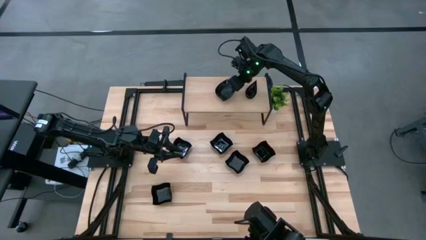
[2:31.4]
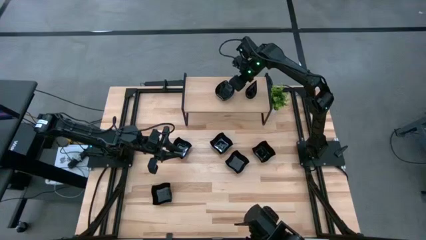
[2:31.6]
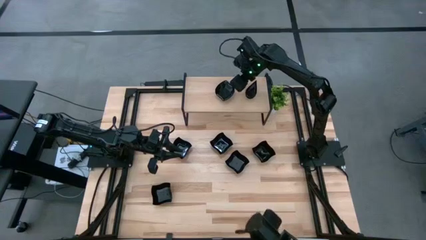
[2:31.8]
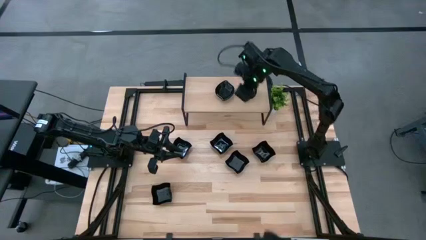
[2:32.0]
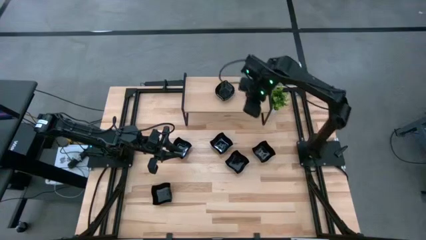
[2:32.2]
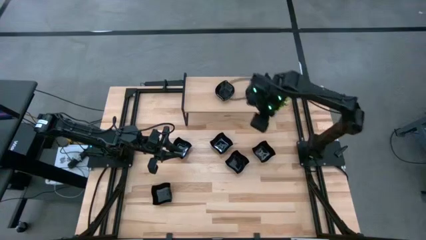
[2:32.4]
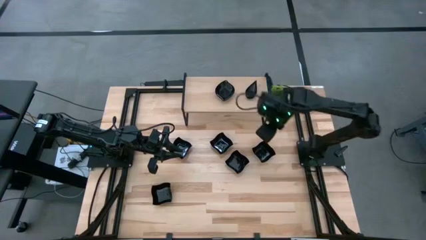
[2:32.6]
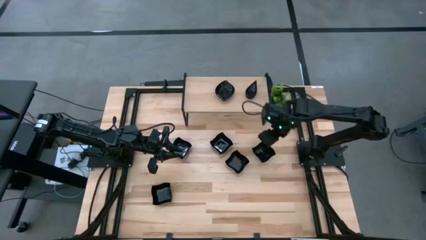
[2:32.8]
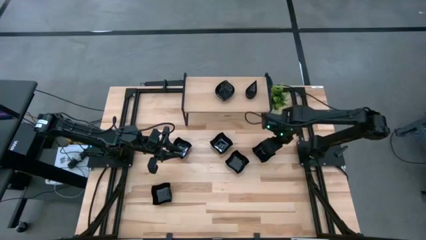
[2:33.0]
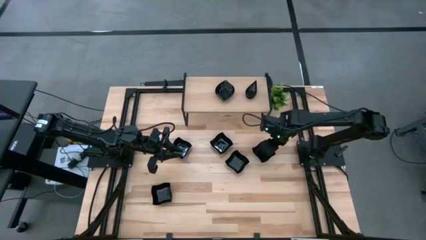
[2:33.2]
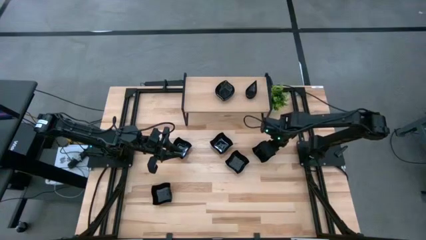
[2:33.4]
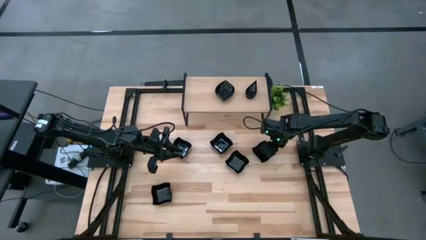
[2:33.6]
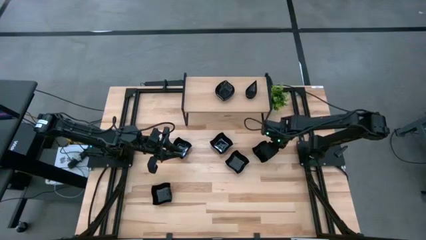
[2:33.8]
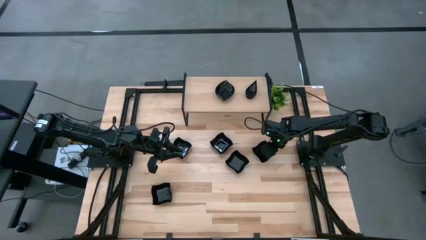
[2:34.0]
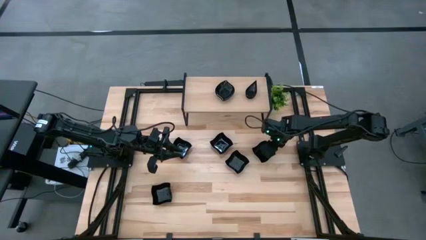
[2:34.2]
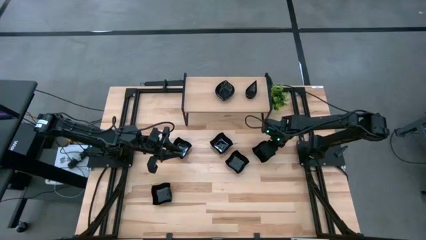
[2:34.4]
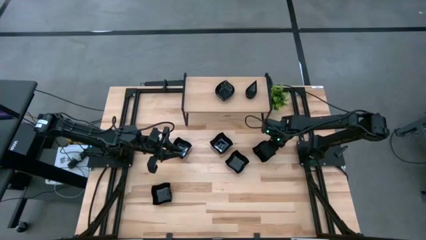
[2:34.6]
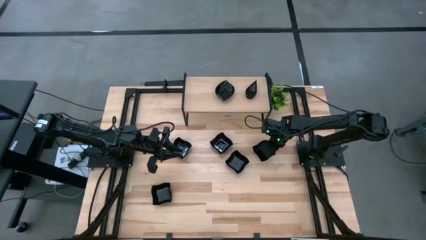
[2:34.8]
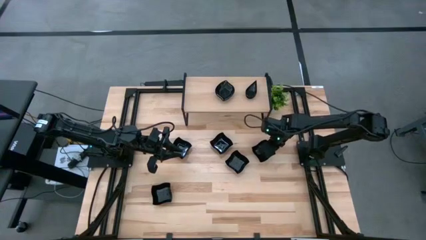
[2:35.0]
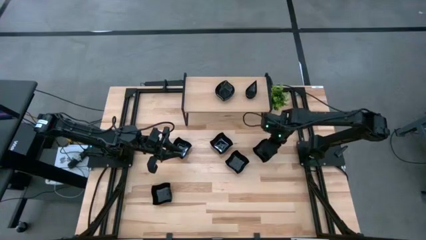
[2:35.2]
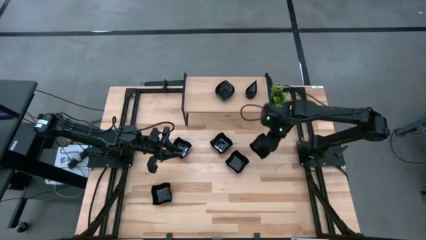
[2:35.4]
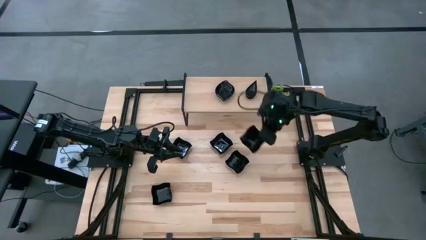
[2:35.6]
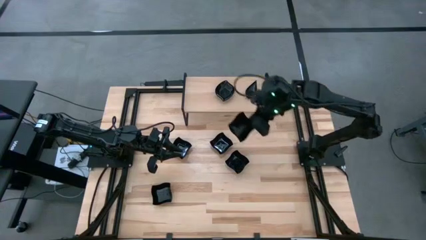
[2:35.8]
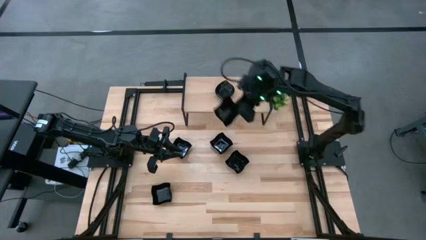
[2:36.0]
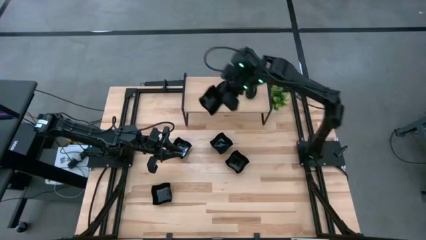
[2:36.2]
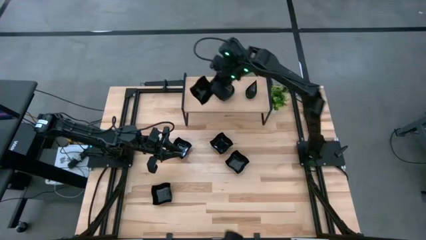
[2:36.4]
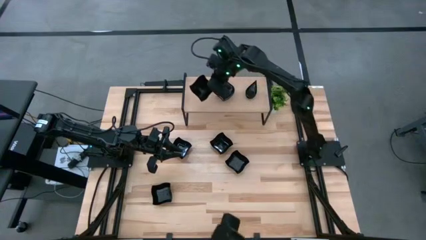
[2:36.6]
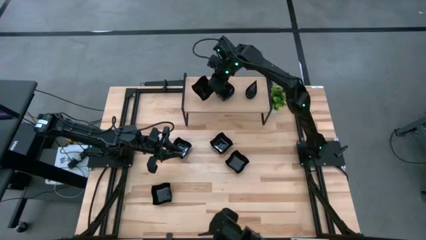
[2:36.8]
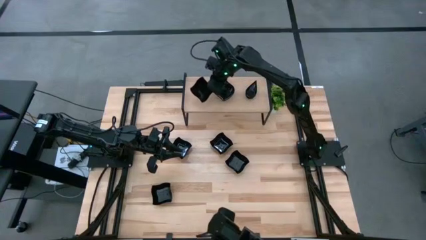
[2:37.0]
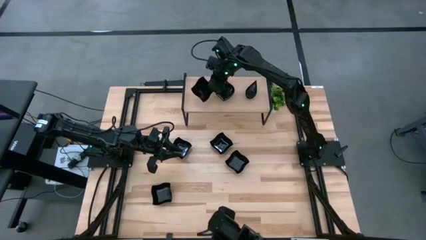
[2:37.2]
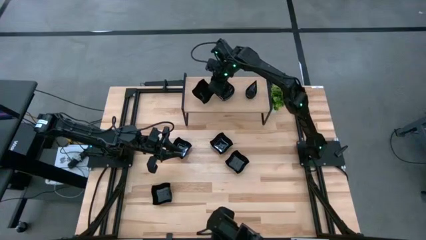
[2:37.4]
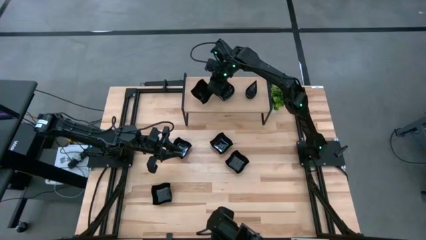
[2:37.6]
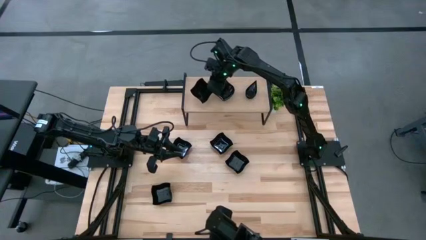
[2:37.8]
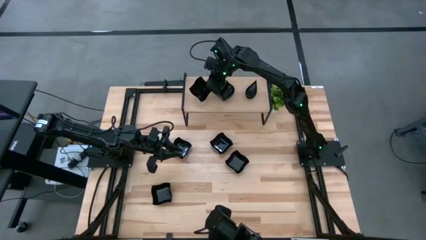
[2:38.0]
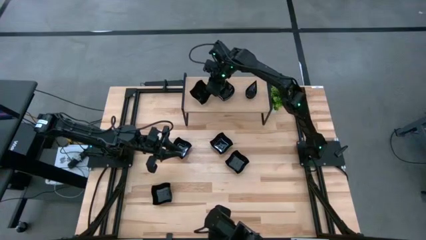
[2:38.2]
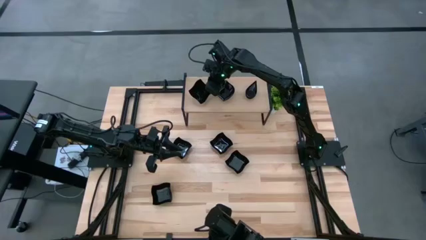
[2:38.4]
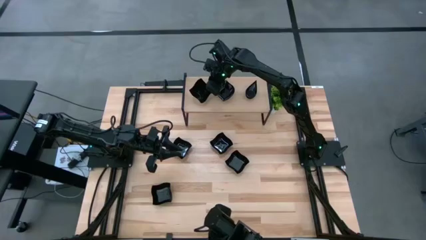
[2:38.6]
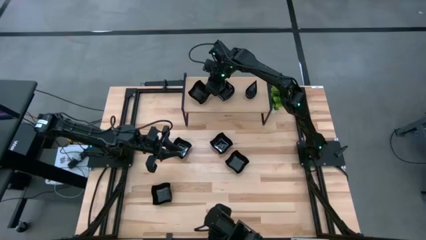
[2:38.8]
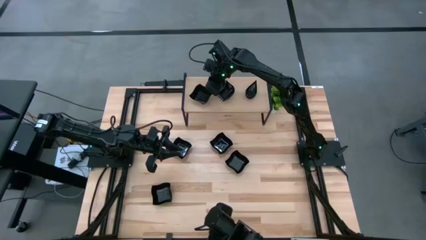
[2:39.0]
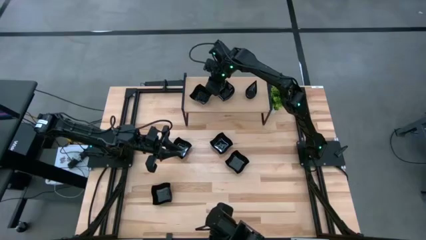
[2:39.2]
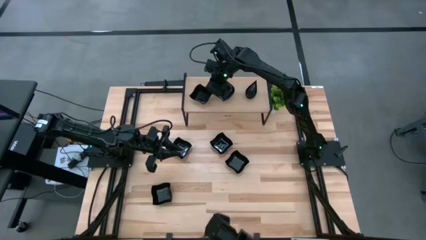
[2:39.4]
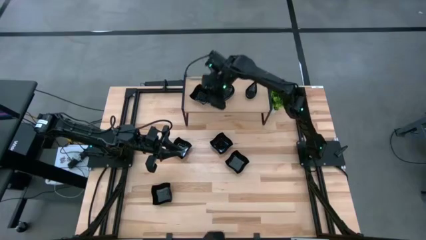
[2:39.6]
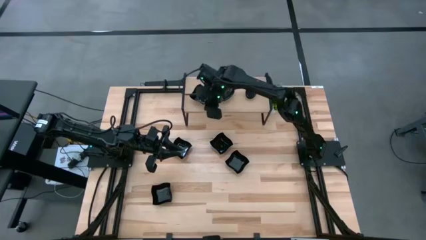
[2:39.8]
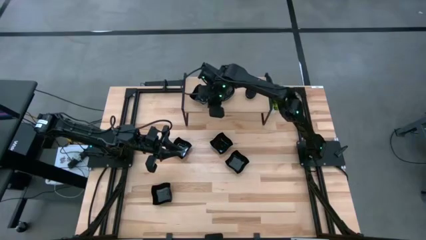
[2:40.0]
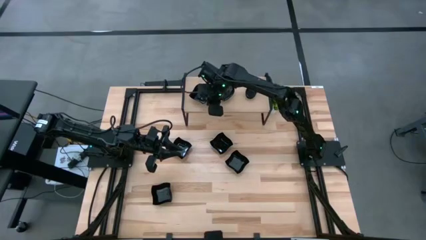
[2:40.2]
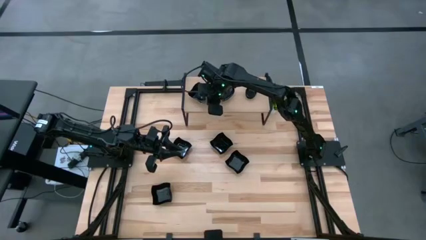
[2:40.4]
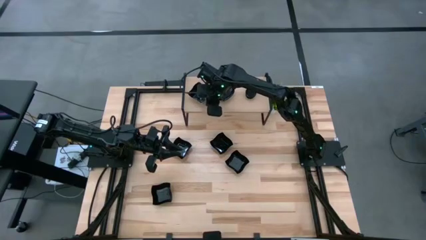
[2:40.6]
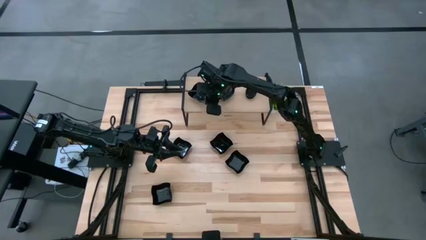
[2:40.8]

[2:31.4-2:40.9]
Task: Pick & Place Mini shaped plates
Put the black distorted square plate on the shelf

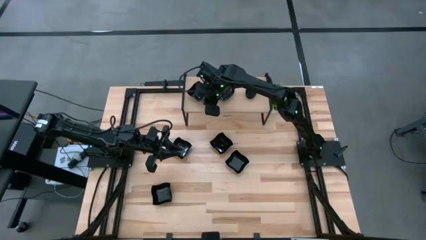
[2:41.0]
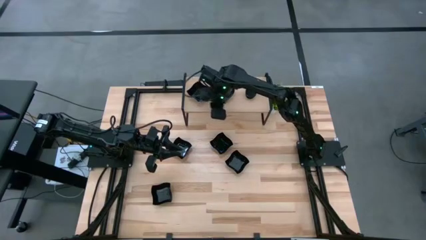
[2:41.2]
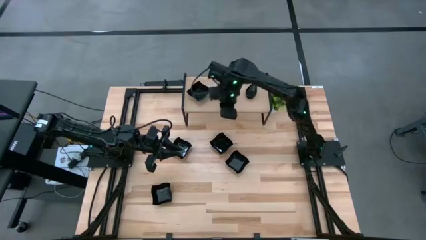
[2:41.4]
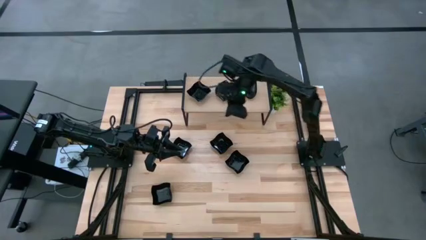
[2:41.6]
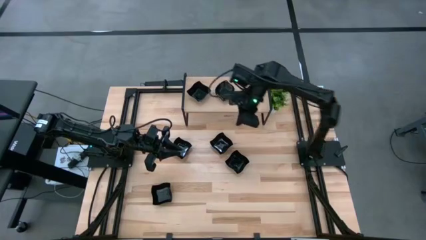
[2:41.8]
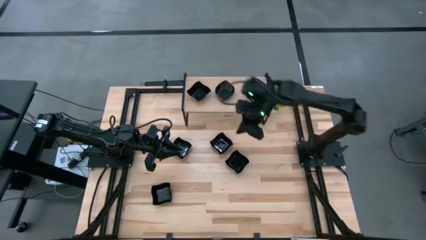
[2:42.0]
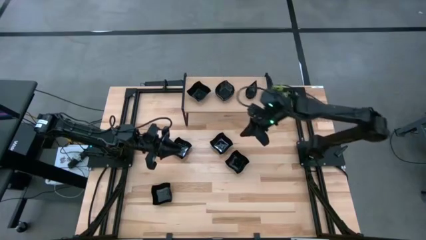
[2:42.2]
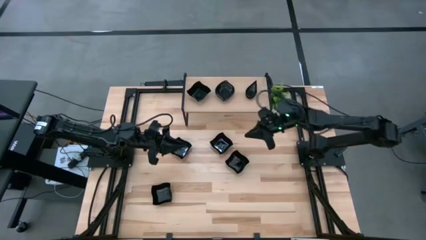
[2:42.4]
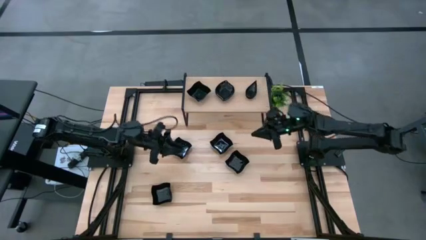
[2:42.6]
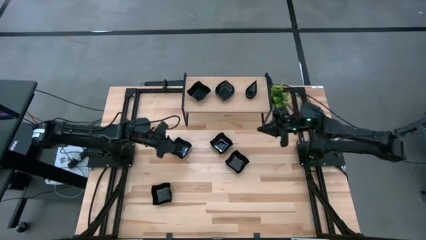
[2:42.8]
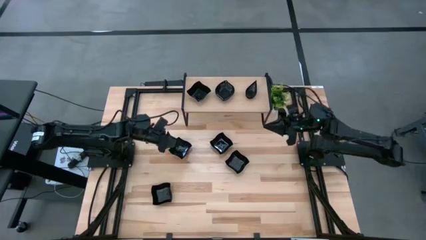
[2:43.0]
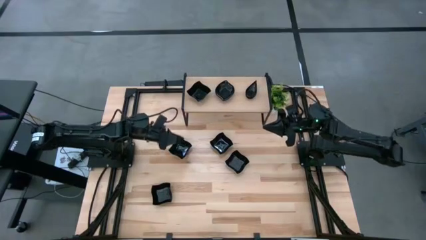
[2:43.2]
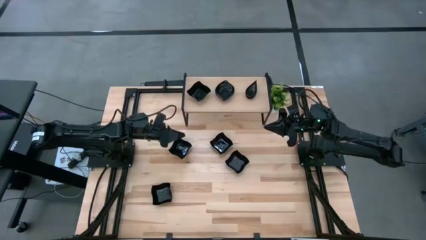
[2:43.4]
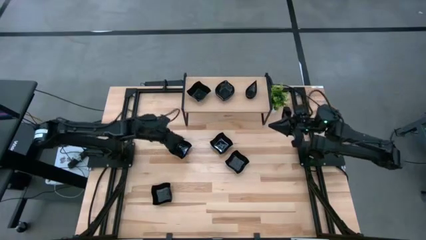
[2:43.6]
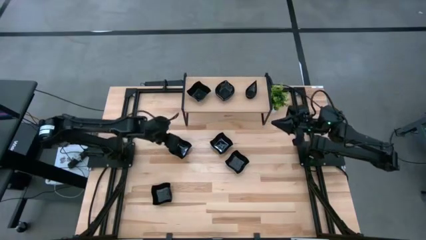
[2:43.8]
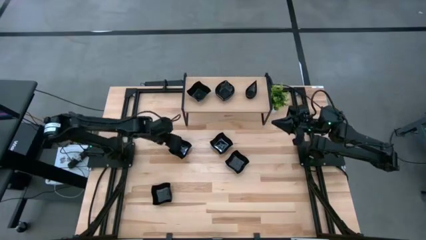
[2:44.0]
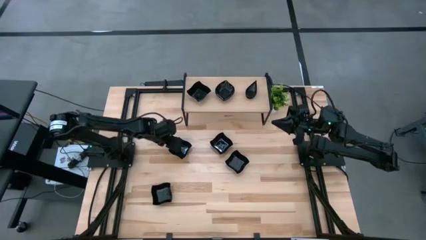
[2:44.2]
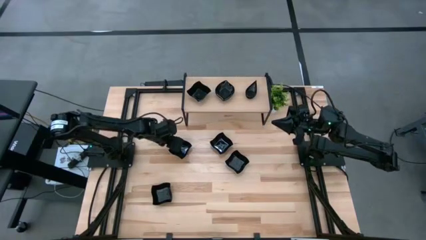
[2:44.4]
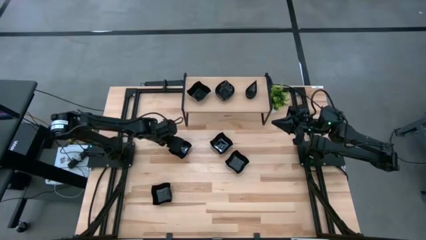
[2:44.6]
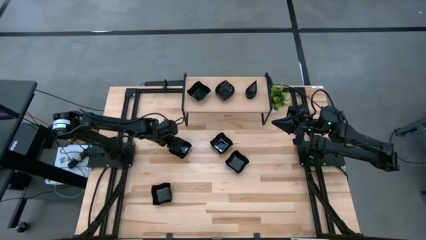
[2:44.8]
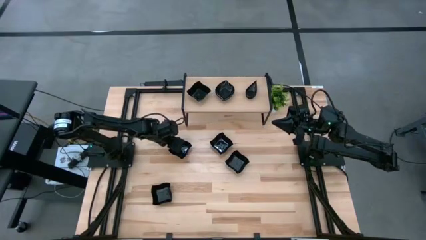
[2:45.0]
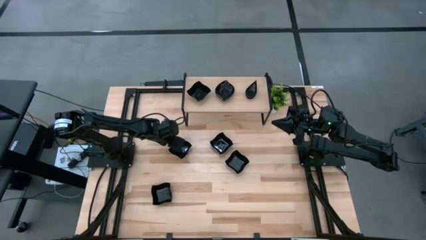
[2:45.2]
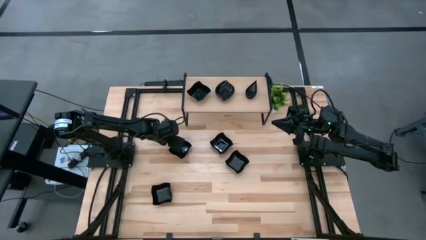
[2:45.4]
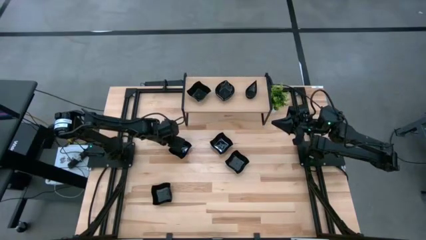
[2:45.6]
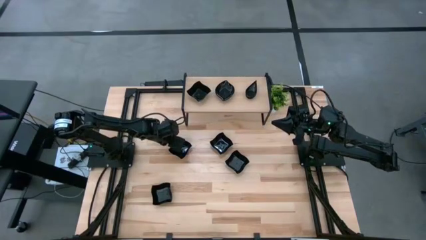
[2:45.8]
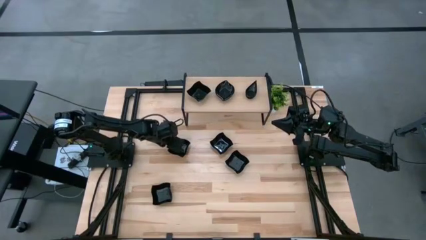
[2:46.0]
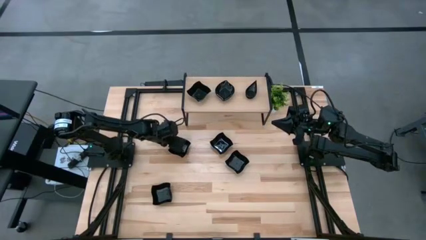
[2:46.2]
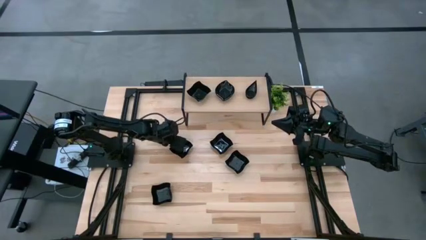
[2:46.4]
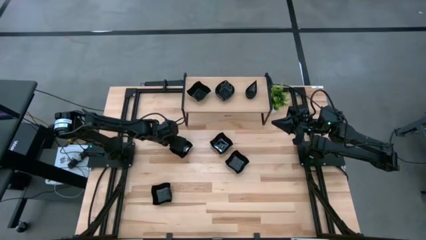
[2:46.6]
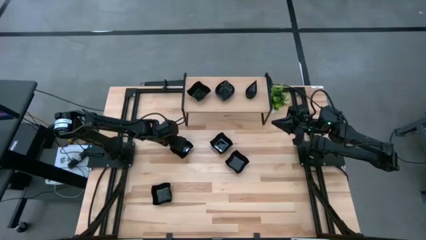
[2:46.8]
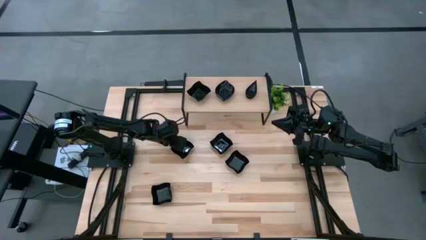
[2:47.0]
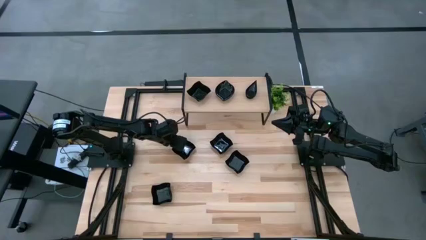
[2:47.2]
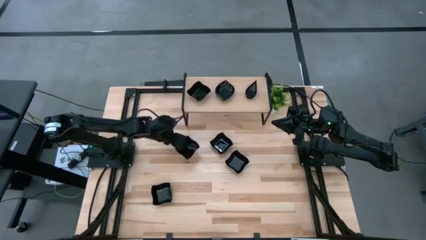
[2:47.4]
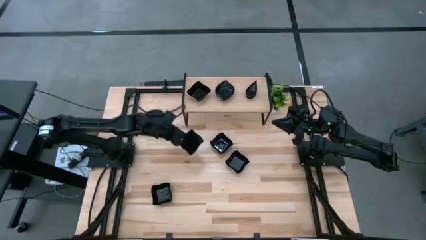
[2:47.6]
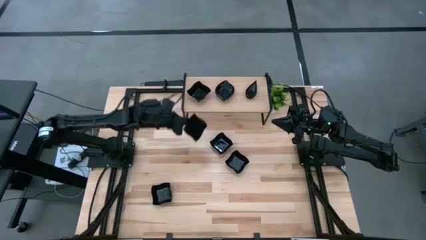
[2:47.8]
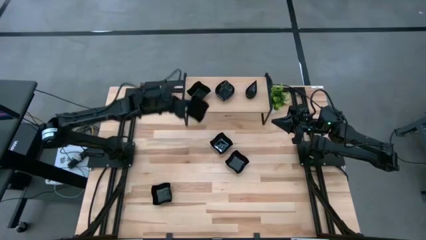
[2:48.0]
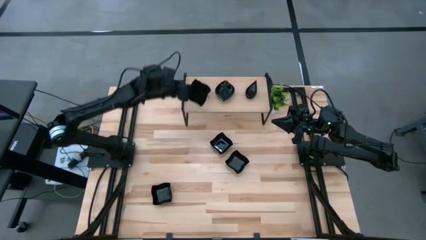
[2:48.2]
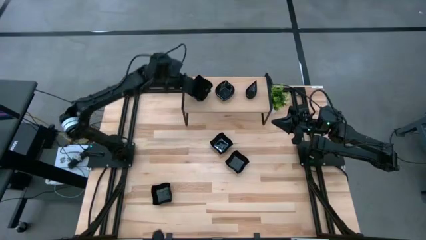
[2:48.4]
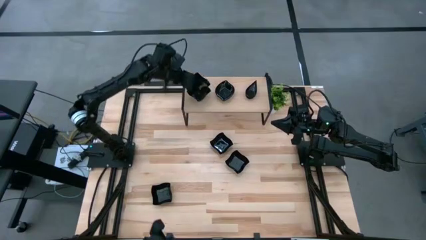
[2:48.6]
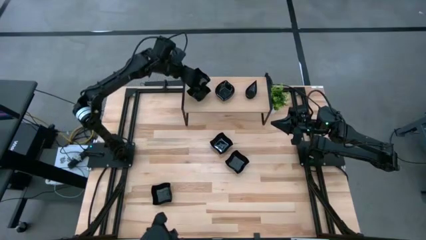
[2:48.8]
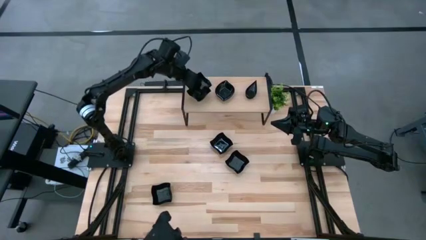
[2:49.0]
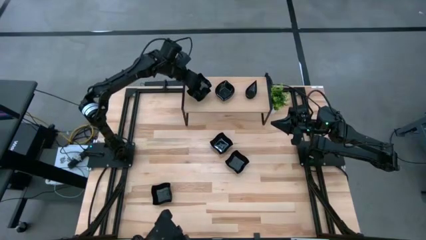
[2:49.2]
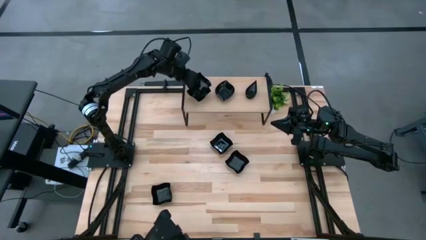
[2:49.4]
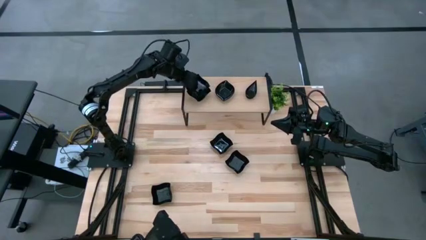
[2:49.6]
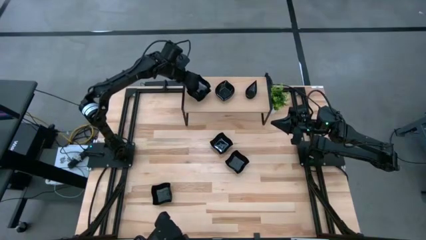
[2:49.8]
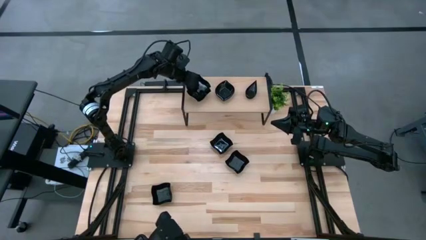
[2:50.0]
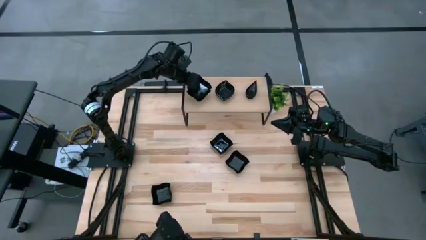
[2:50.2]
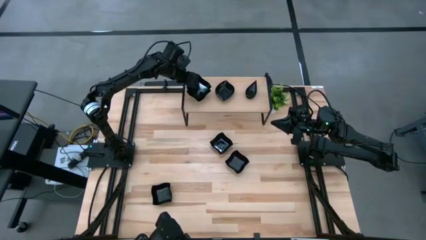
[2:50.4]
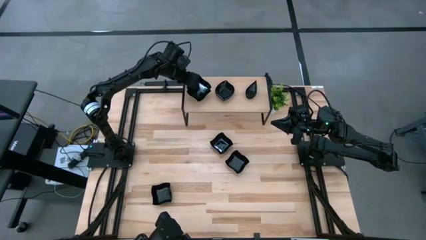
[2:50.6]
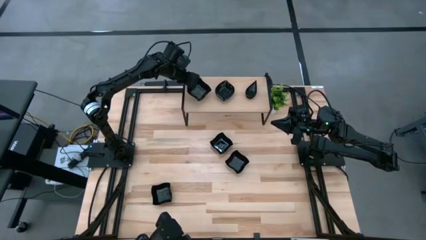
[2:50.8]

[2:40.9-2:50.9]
Stack the black distorted square plate on top of the other black distorted square plate on the shelf
